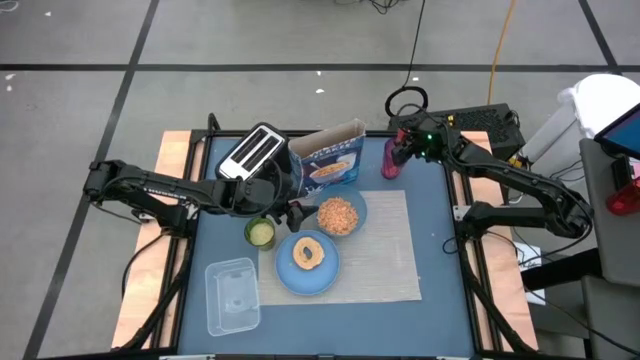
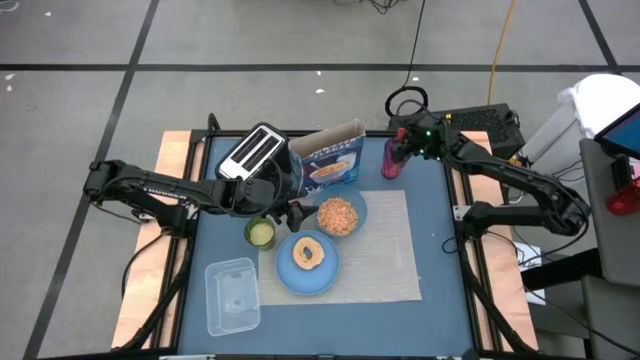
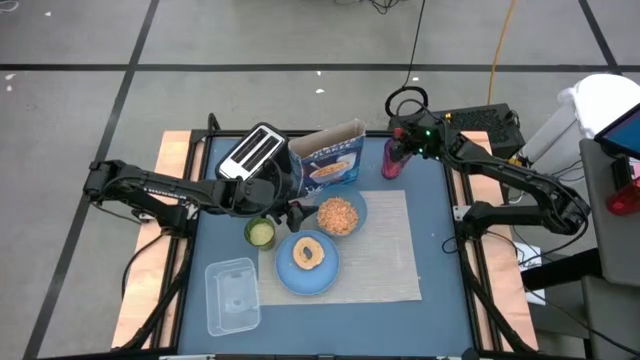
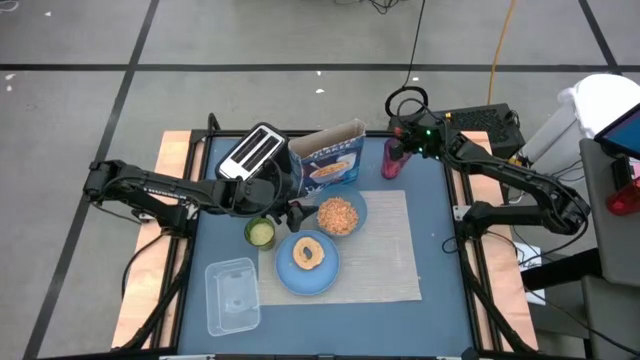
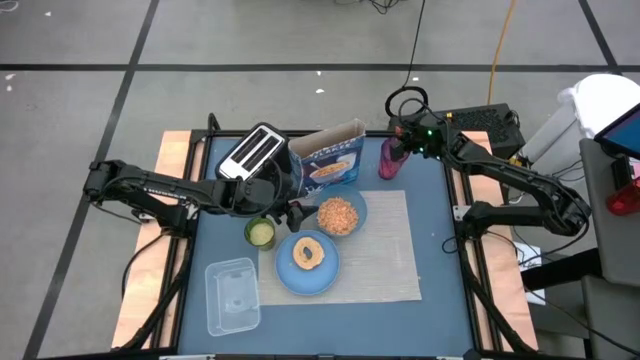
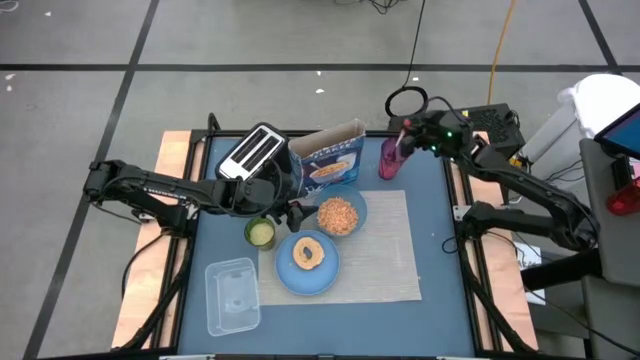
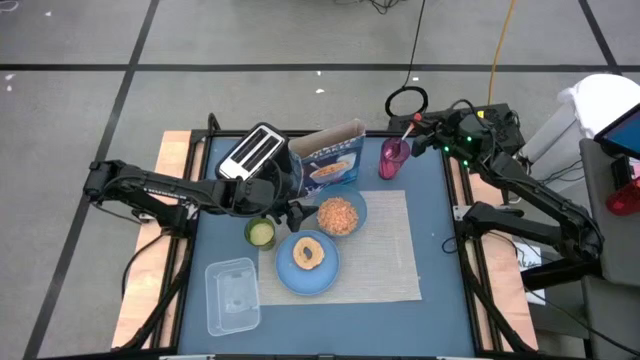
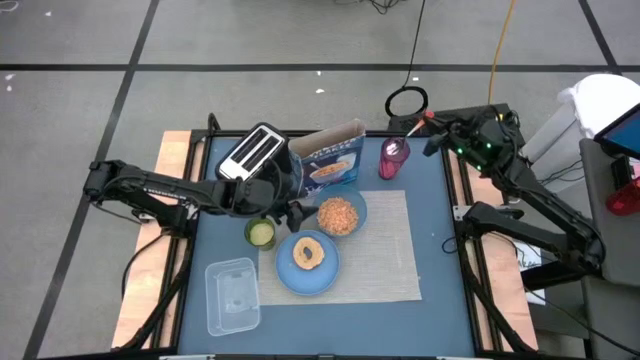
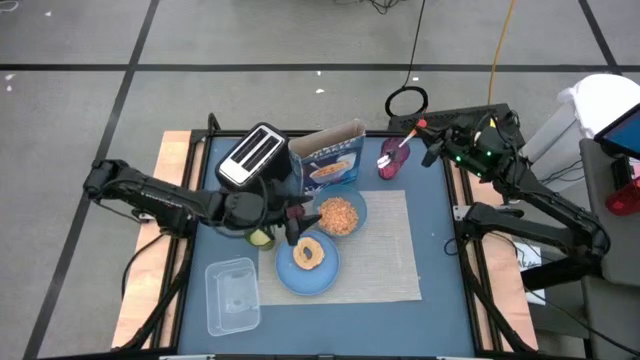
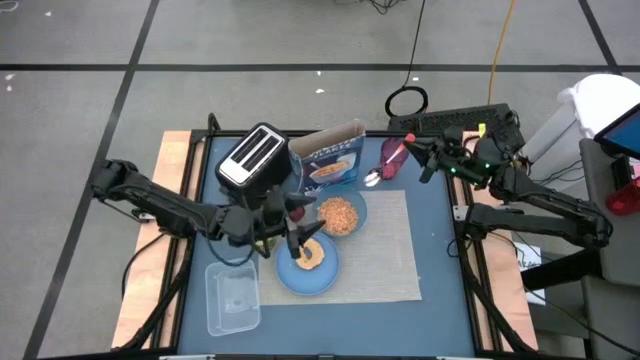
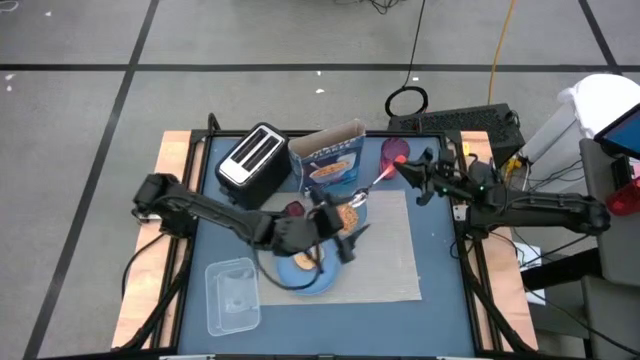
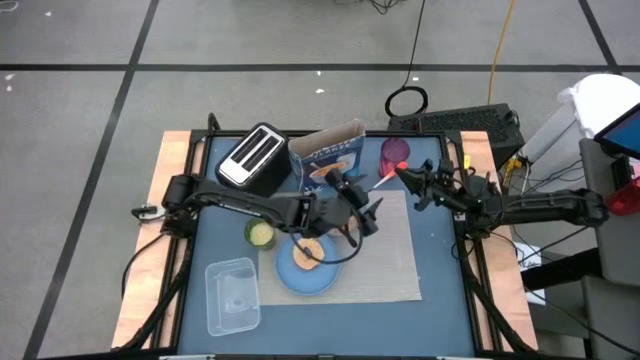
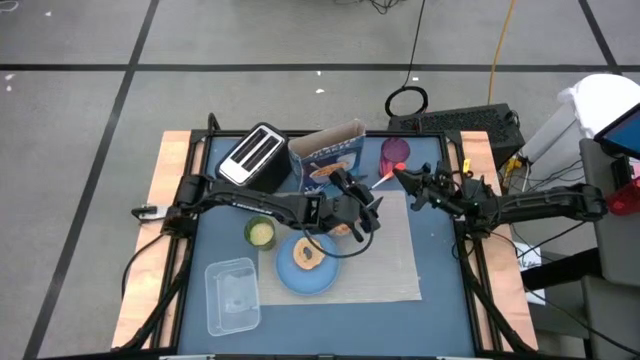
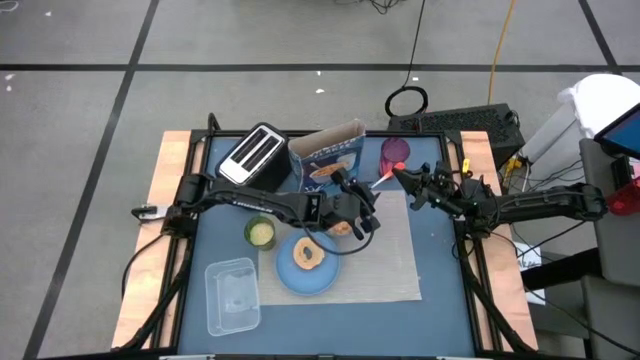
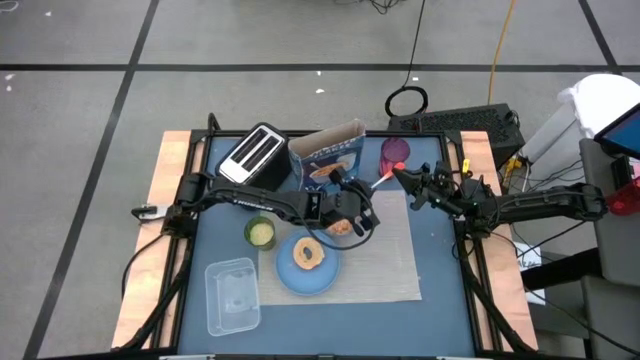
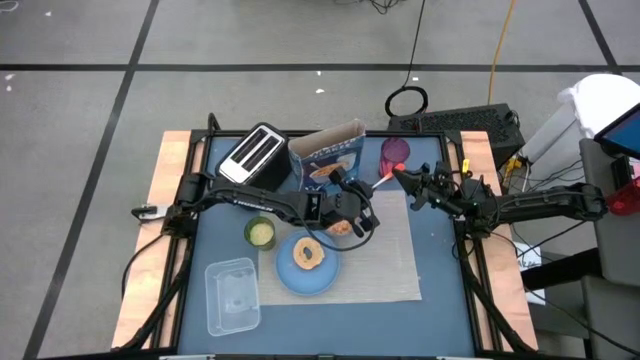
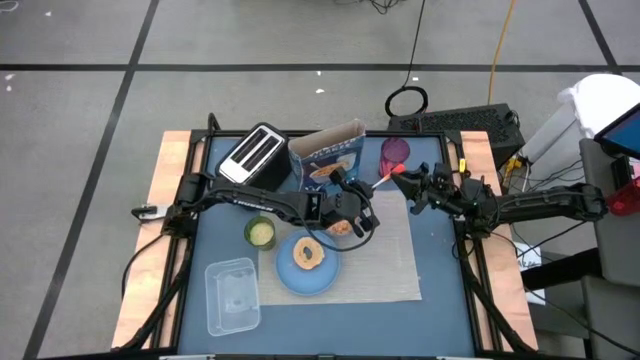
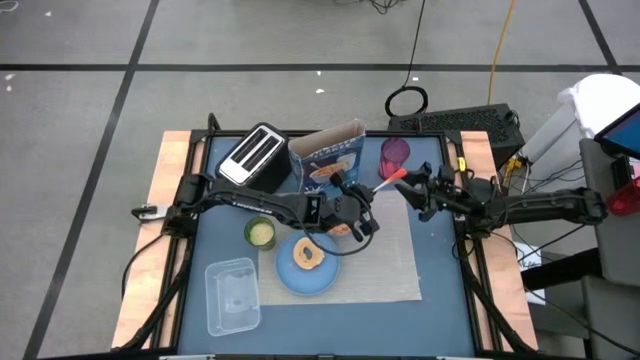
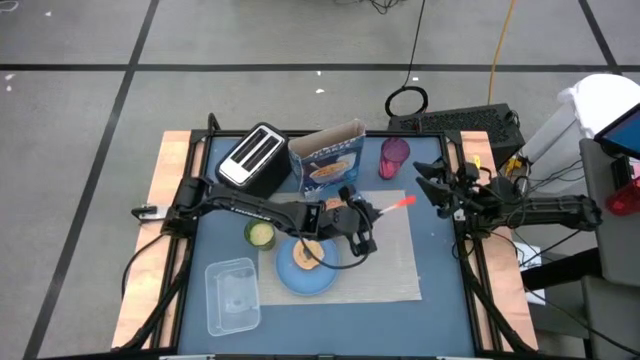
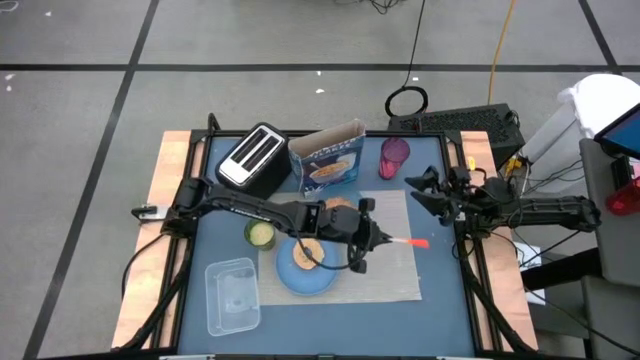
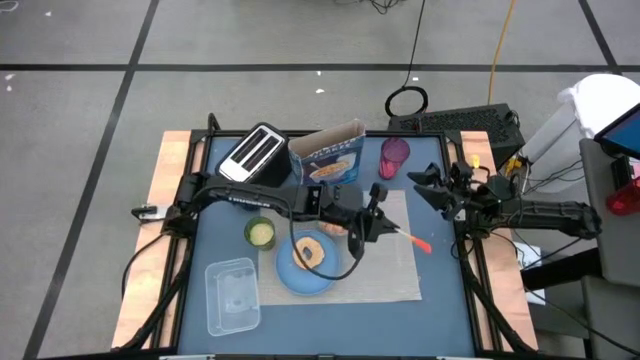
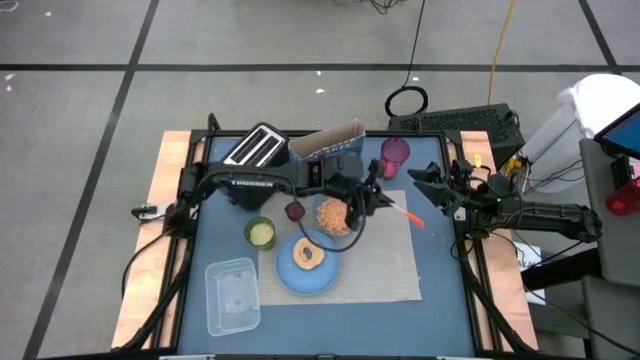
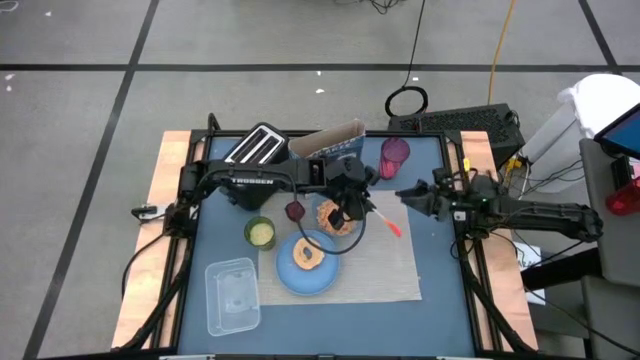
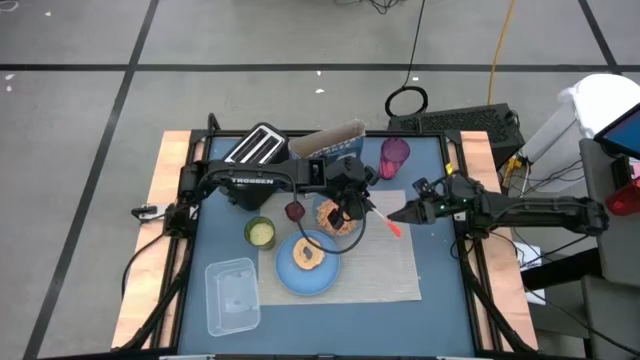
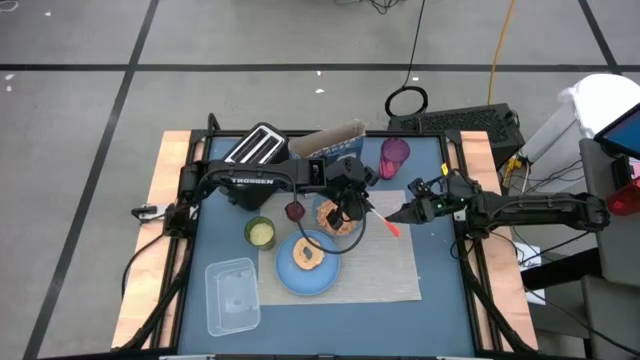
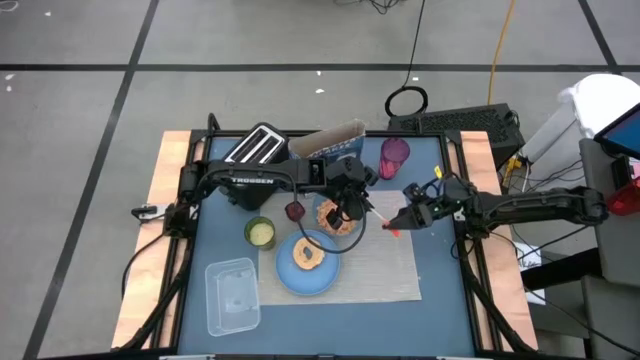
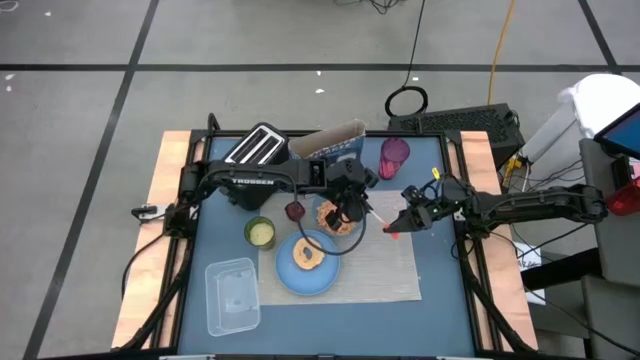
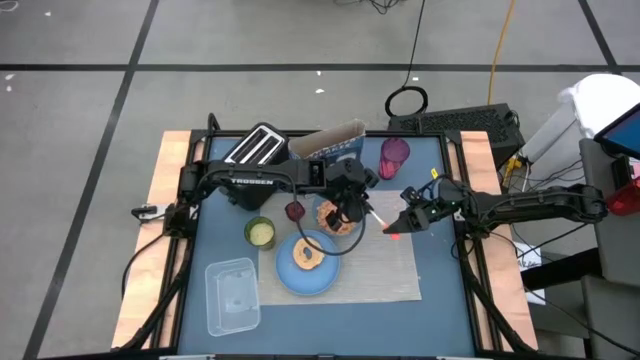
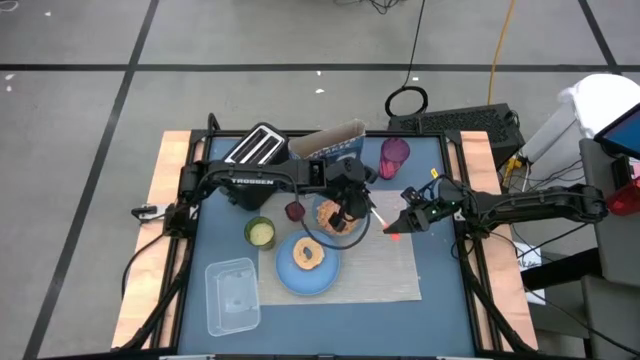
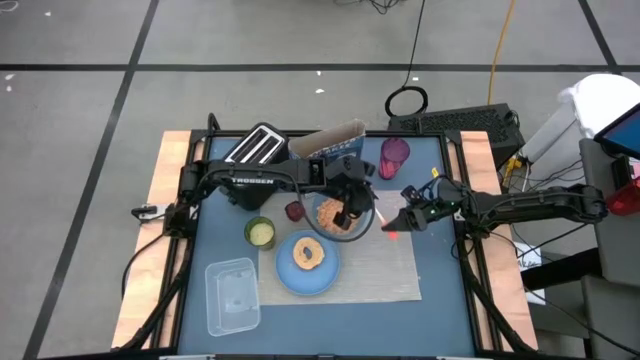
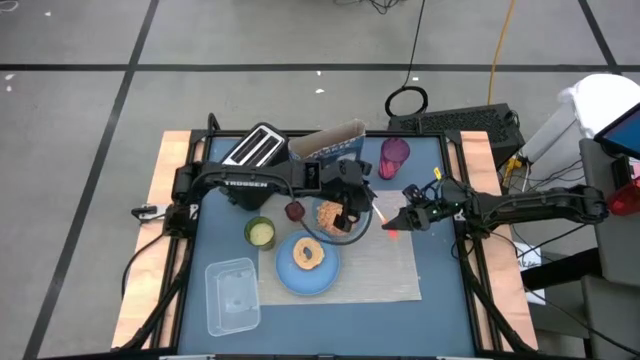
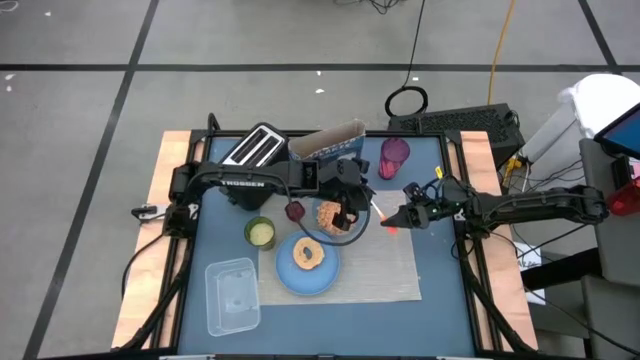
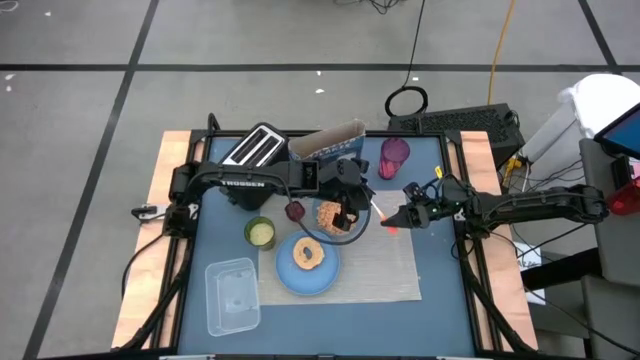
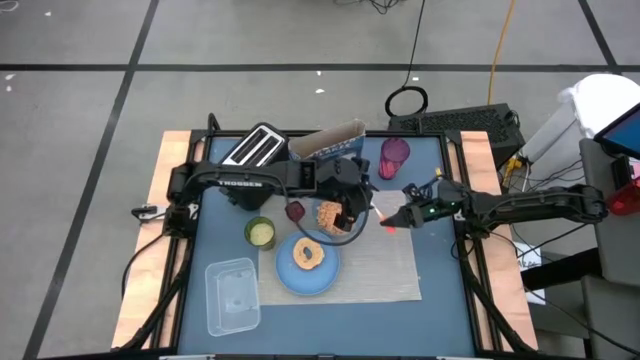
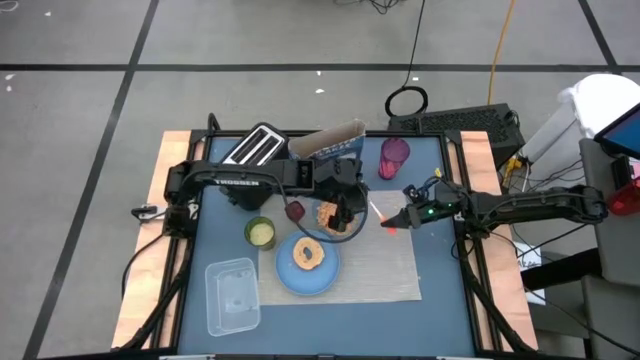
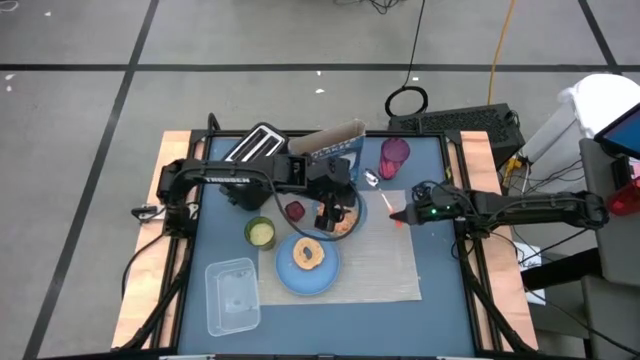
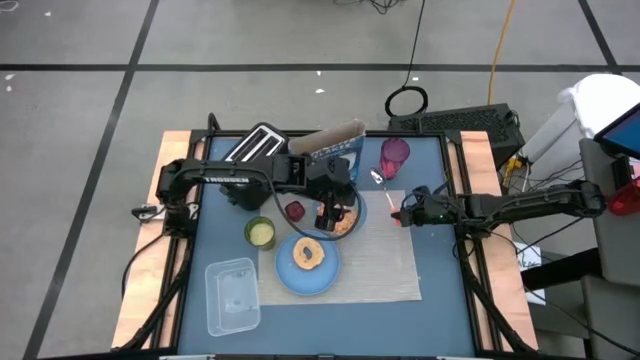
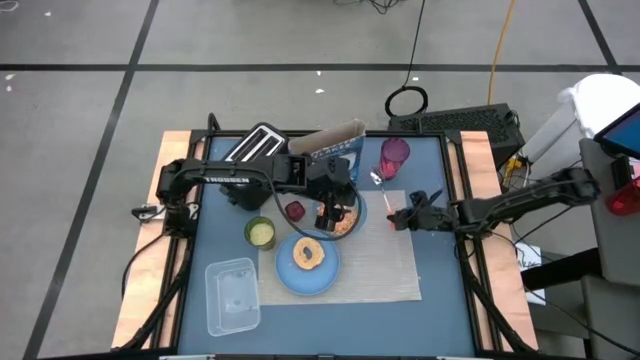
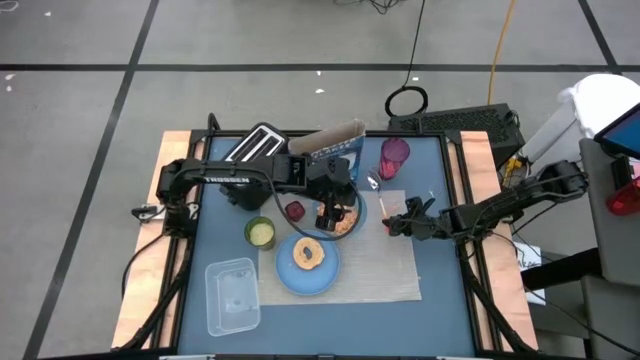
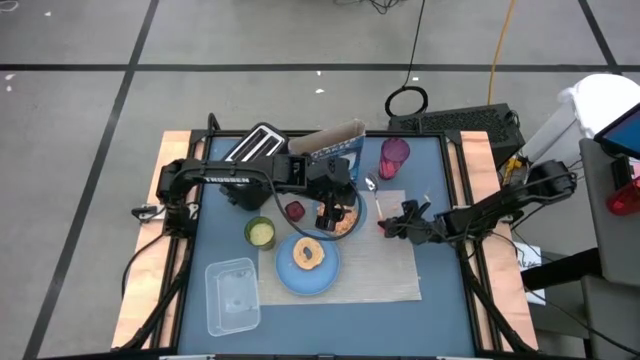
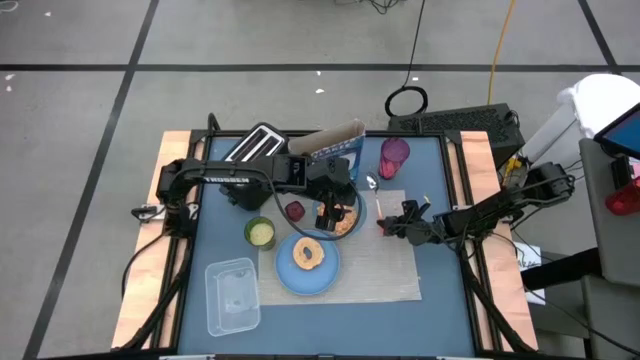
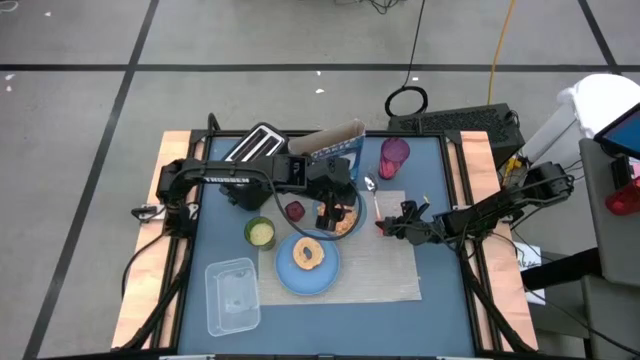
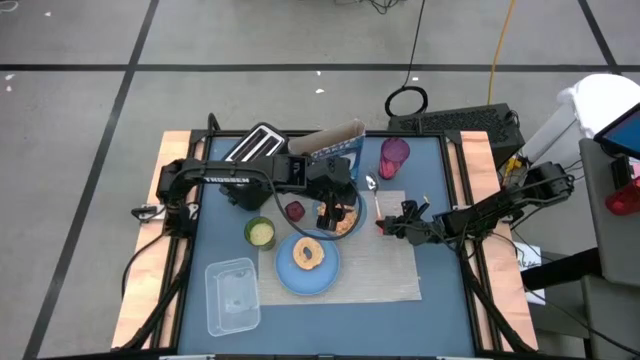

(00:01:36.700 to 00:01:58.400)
Task: Arrange a breakfast setting
Put the orange spoon to the right of the light blue bowl on the gray placemat

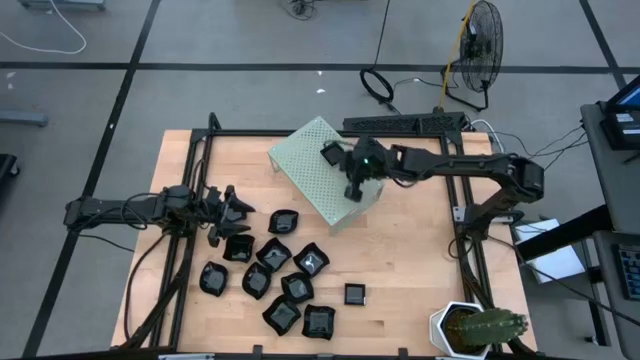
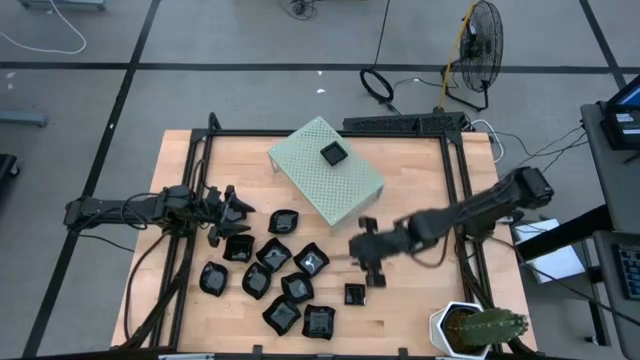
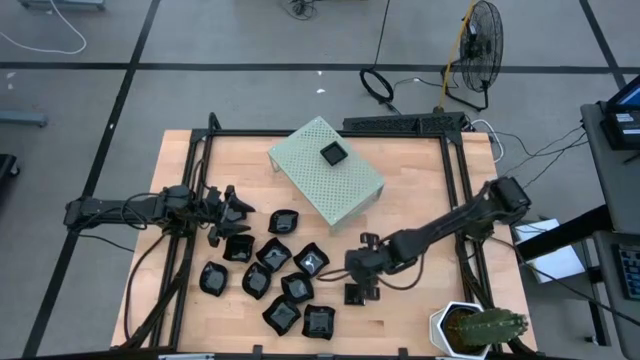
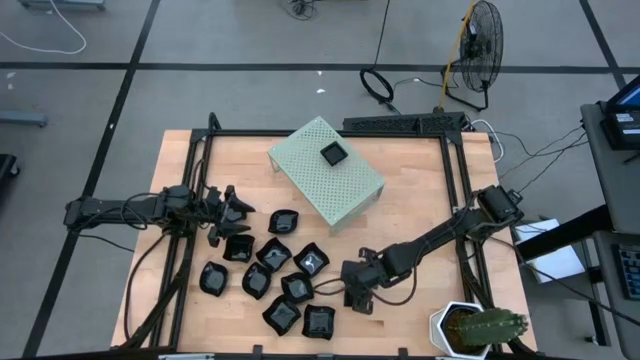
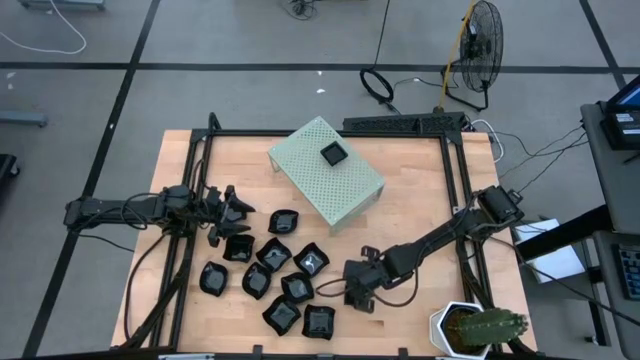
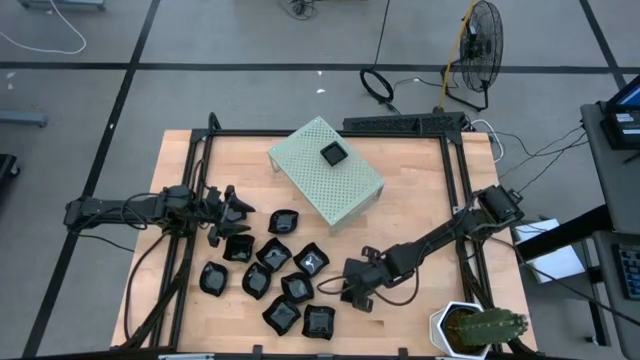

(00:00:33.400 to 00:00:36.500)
Task: Pick & Place Mini shaped plates
Stack the square plate on top of the other square plate on the shelf
